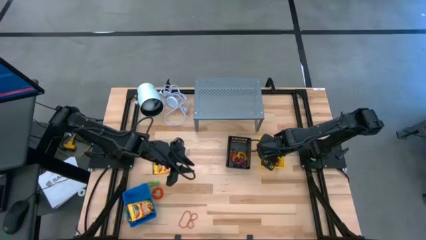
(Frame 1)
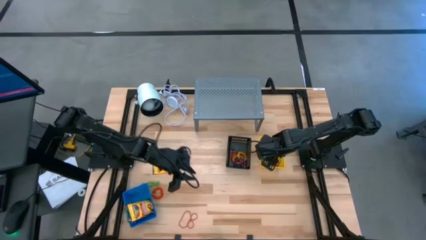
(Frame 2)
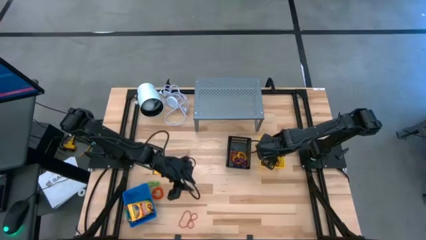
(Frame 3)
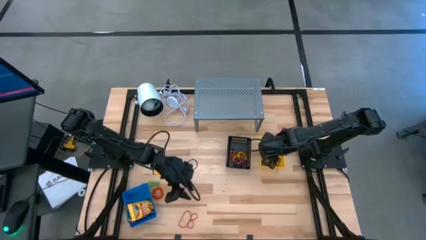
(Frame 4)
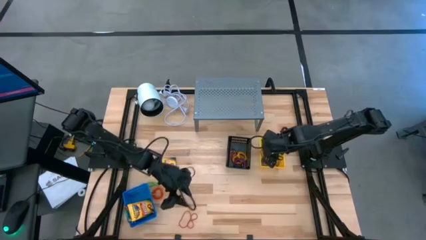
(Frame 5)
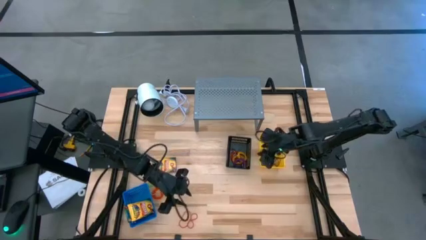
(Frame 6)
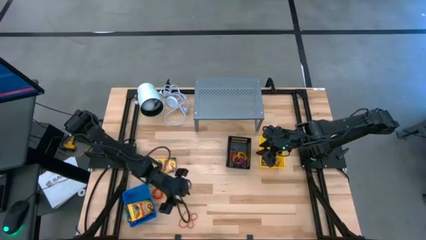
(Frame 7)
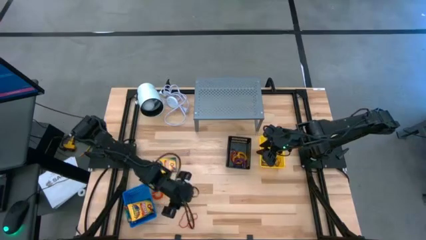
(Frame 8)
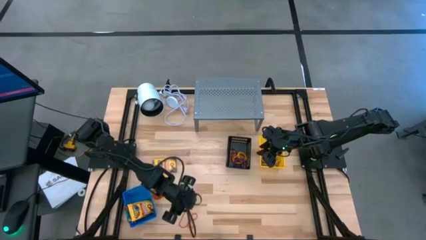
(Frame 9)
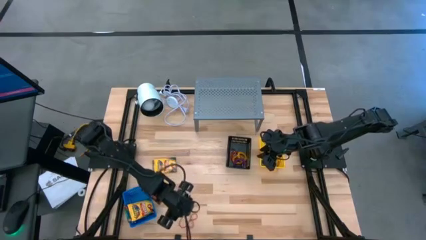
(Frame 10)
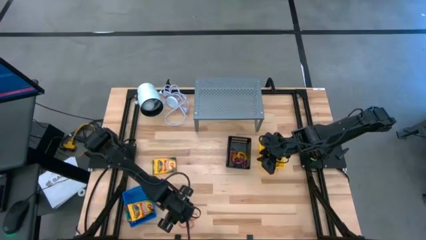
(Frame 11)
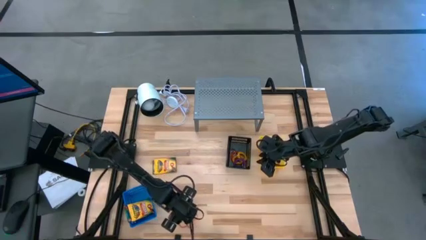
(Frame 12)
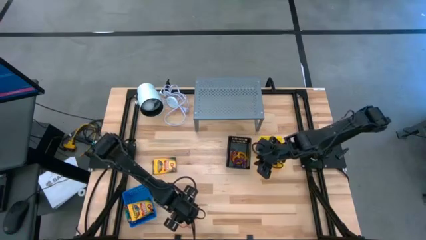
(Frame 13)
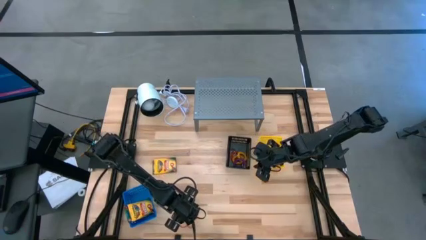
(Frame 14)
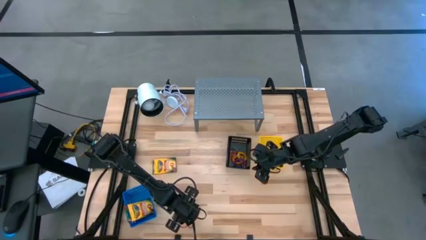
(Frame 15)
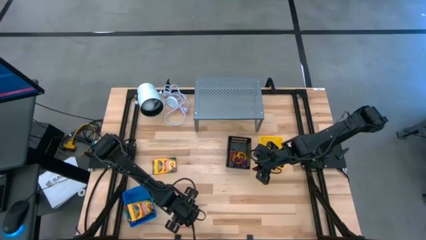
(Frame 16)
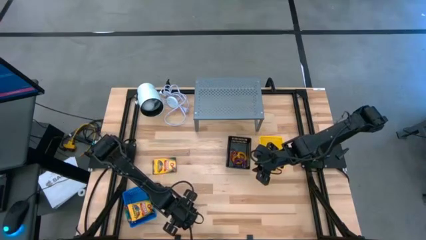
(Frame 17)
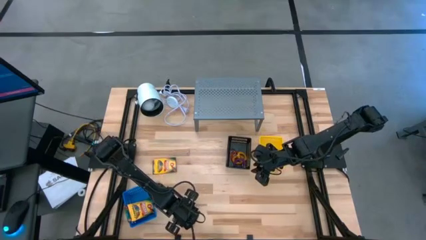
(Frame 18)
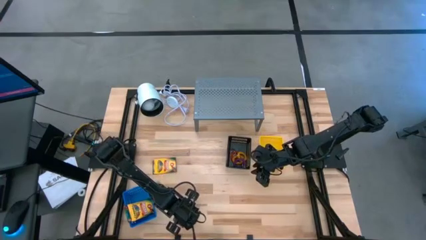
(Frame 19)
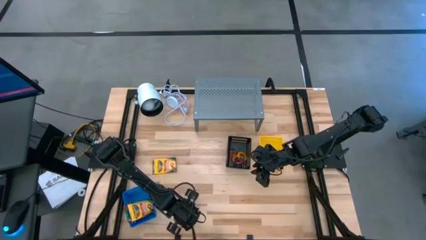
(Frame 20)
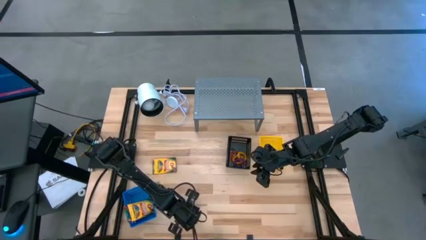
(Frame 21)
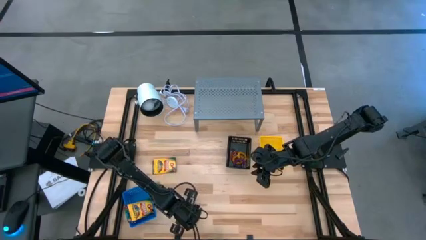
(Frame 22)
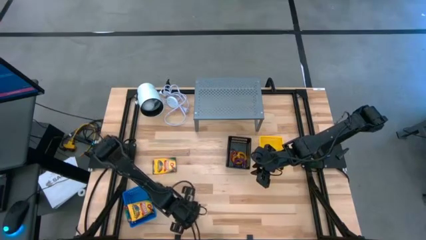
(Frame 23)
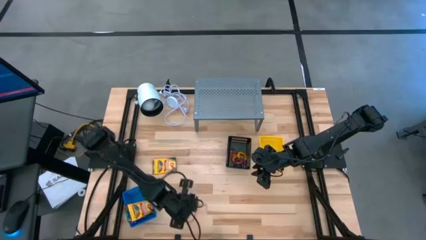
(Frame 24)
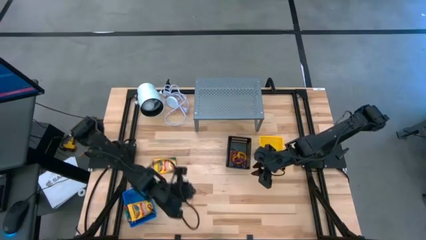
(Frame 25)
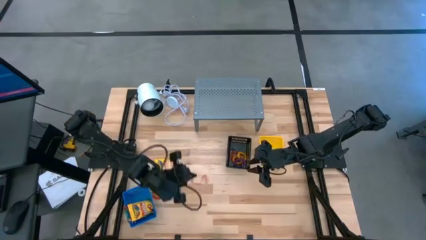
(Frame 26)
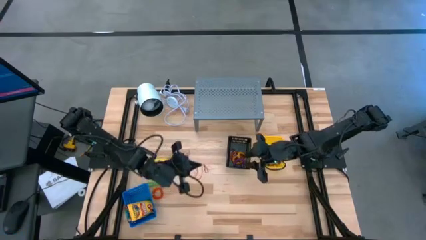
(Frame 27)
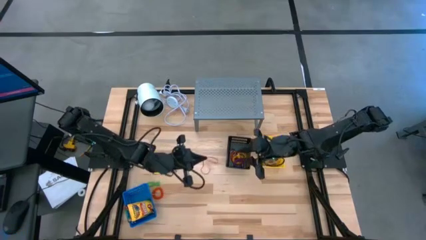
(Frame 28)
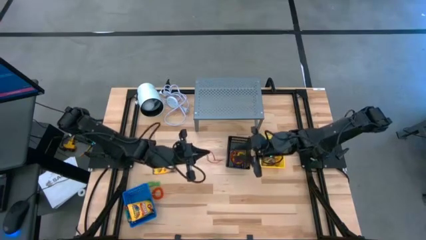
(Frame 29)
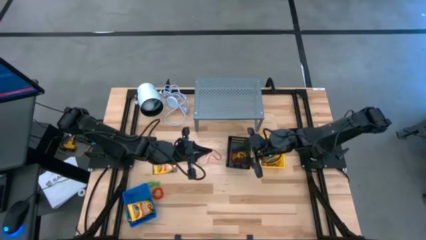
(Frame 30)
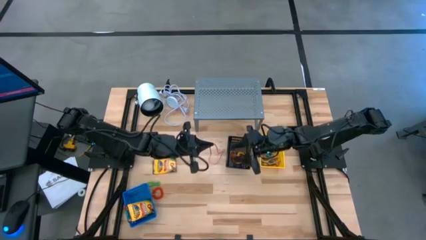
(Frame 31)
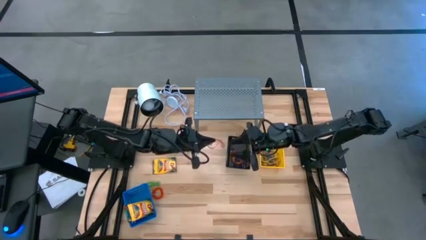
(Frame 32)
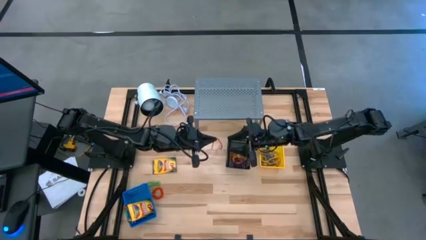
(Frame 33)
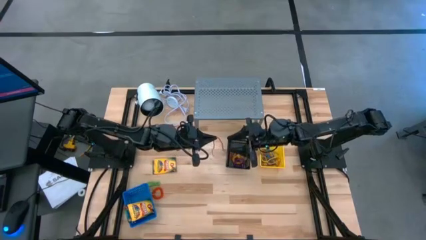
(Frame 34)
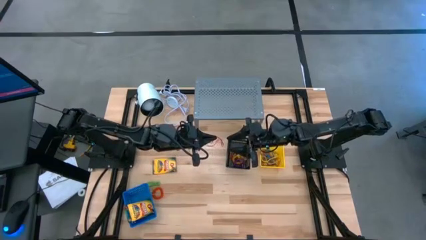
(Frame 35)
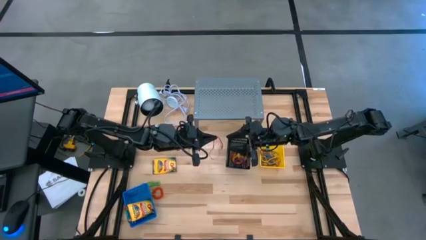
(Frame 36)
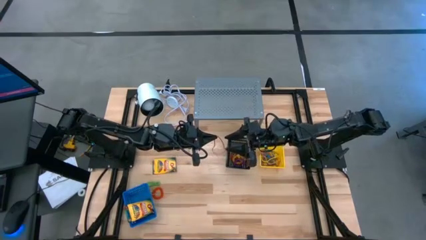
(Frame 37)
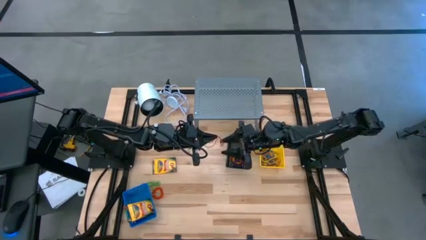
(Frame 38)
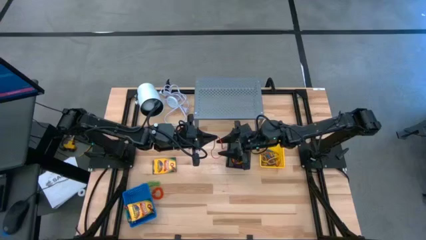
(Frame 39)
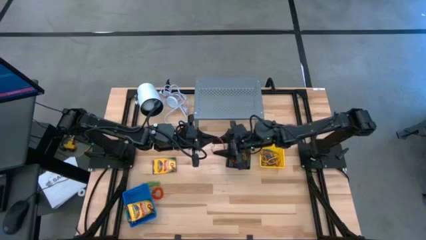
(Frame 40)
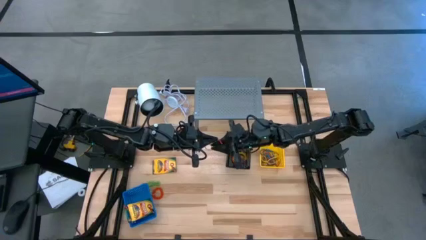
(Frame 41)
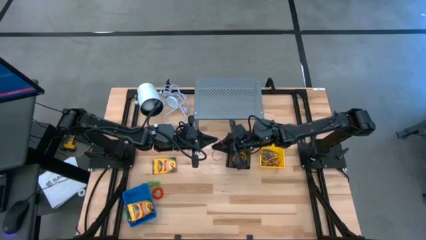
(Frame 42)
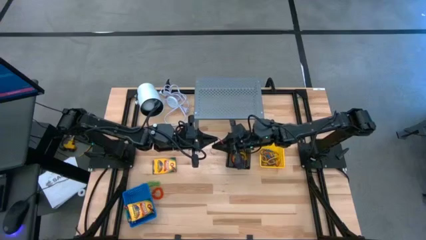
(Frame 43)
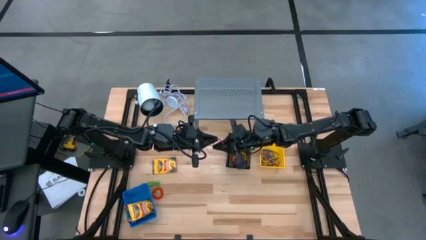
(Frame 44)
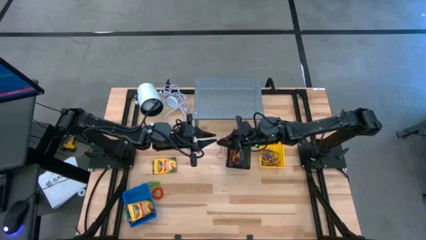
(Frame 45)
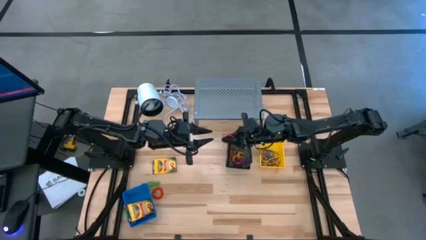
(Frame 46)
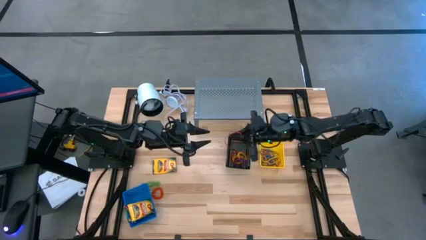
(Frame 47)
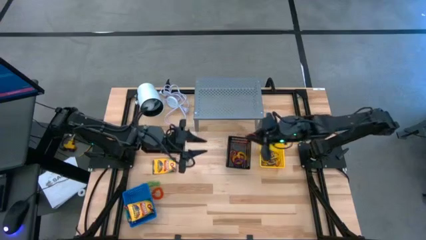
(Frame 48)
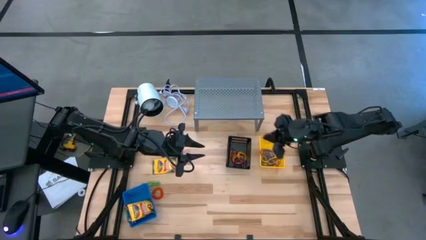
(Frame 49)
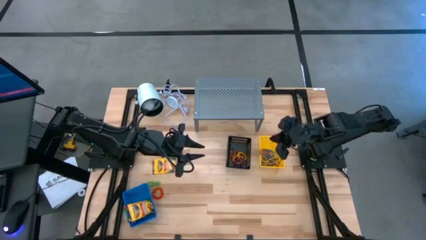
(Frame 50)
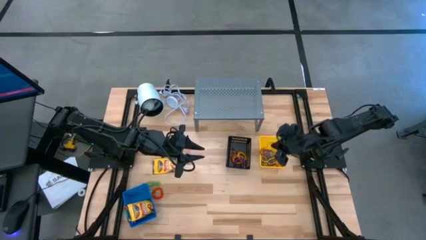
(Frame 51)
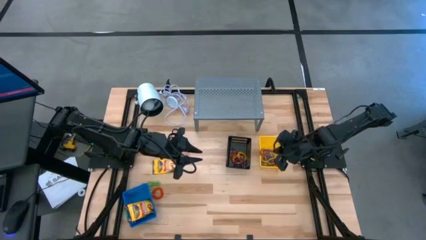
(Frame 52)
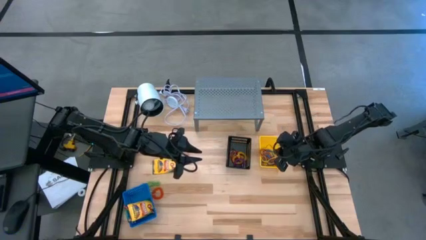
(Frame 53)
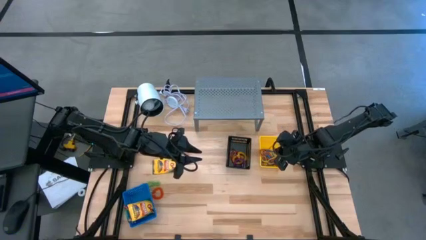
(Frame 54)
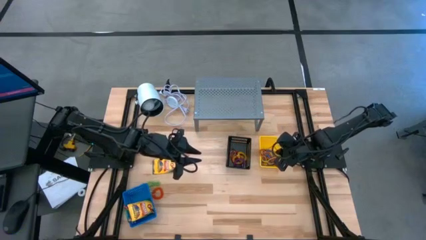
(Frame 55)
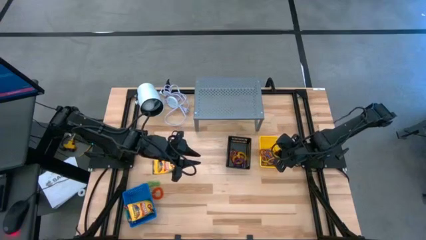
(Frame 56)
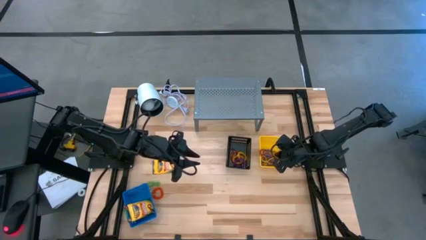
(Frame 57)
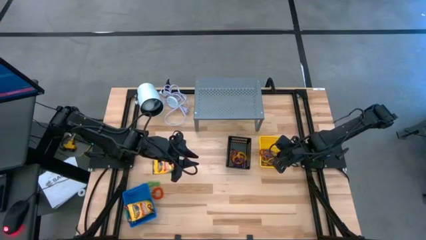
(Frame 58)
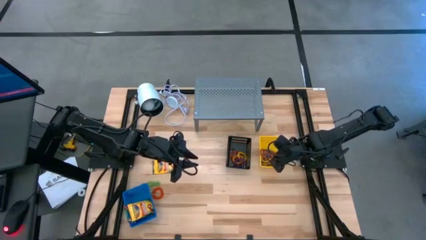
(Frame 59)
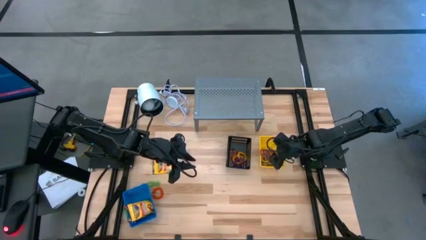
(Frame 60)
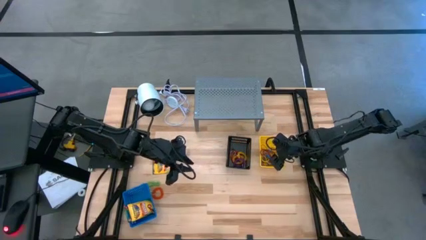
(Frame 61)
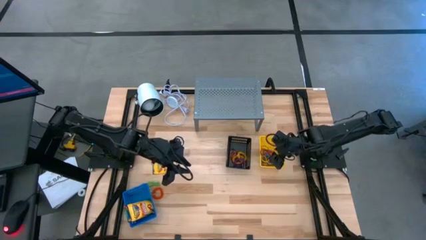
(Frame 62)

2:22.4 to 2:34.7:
Task: Pick & Place Office Desk Supplies
Put the red rubber band into the yellow basket

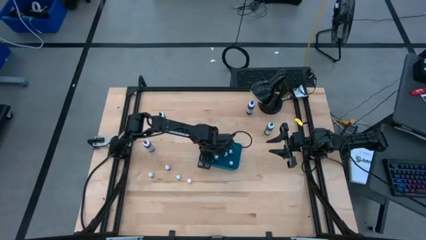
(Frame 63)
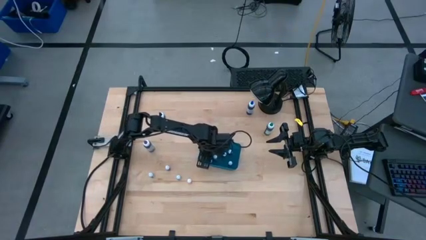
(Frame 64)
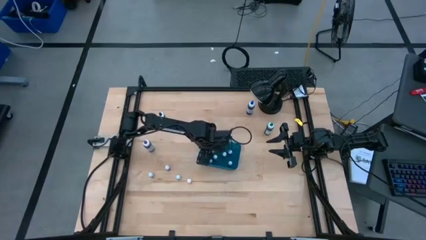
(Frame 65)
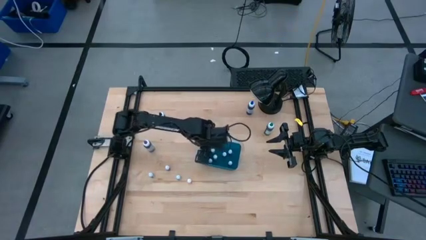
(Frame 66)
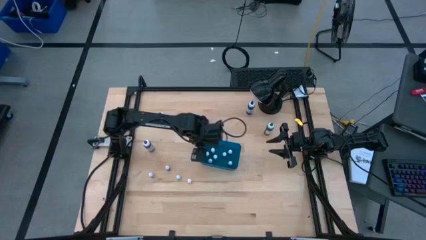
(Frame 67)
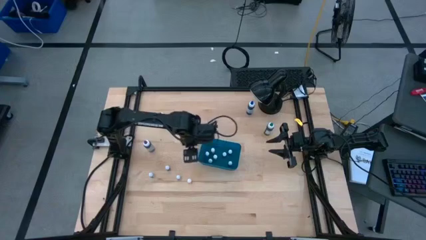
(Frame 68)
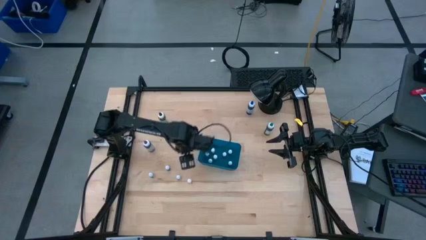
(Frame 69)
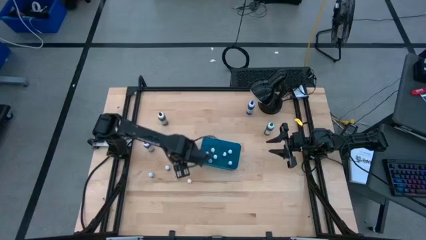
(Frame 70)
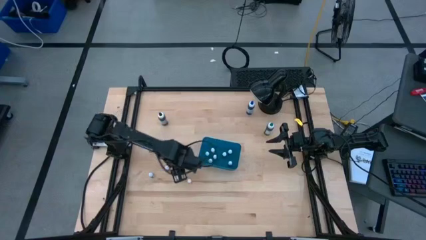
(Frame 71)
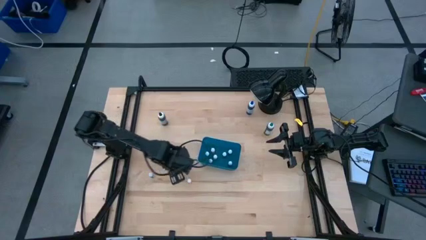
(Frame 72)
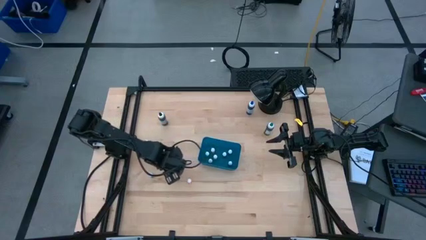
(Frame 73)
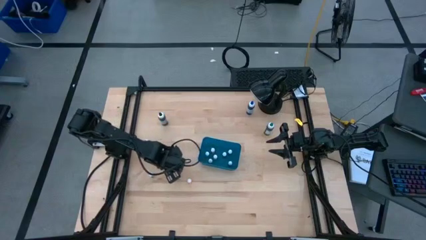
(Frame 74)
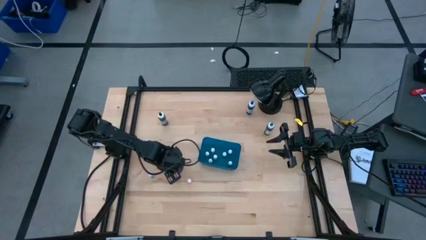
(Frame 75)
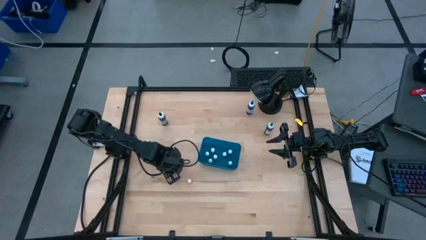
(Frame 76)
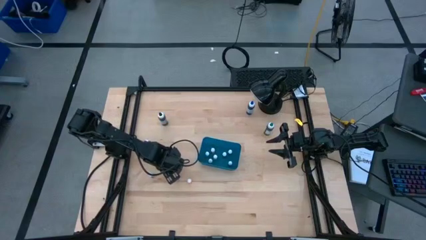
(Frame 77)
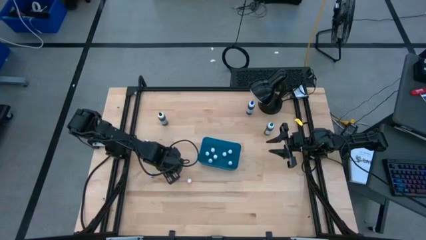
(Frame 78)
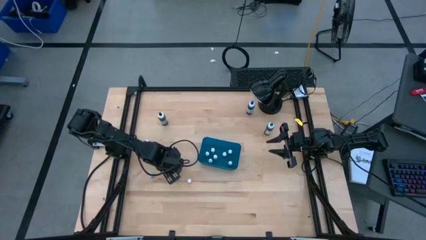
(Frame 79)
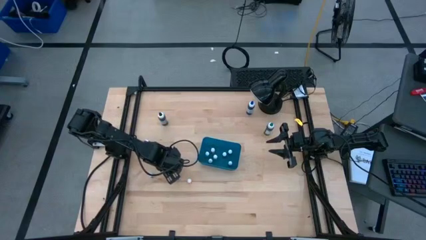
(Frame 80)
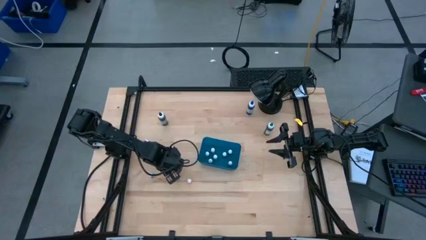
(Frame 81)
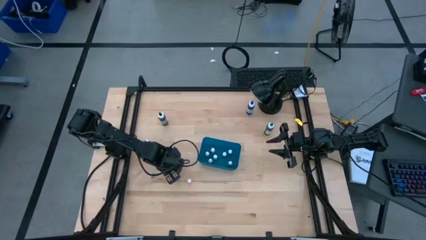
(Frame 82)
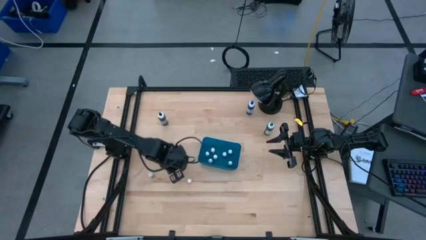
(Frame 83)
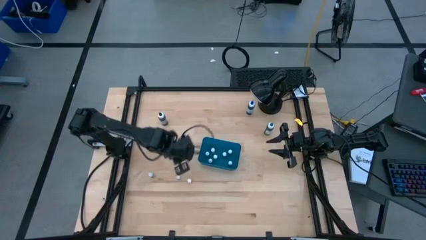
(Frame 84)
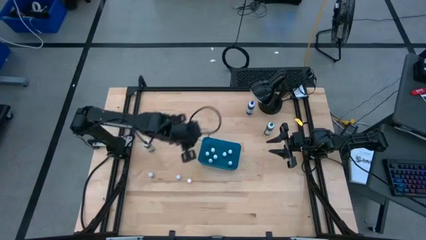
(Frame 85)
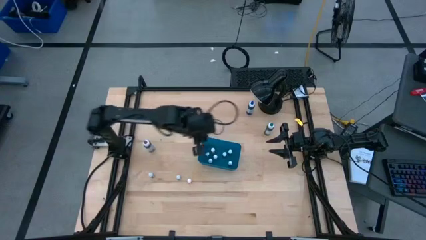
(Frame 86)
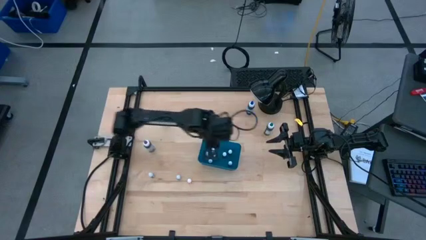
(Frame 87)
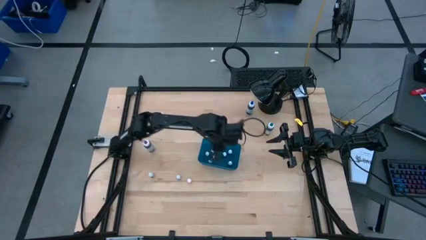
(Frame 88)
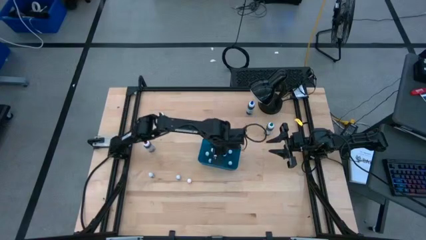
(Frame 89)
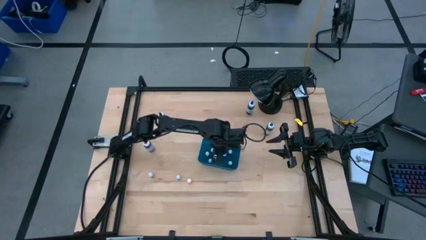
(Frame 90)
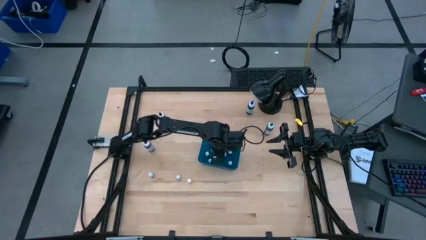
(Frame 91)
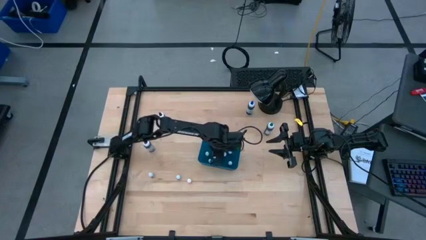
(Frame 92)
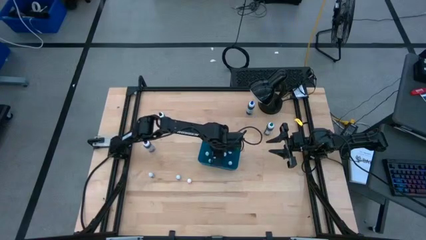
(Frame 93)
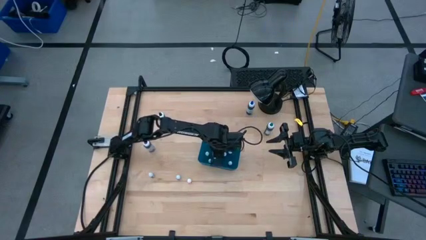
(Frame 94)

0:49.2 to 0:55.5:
Task: Pick & Place food coloring
Put the small violet food coloring bottle into the blue bin
